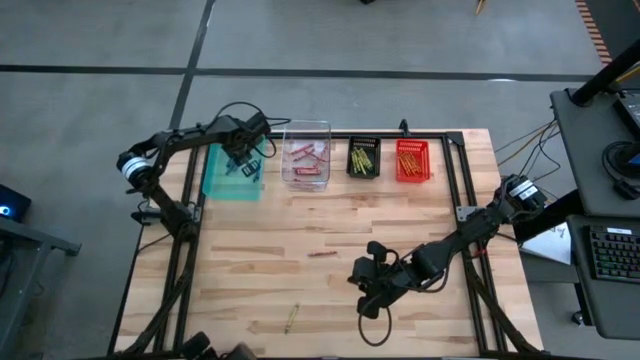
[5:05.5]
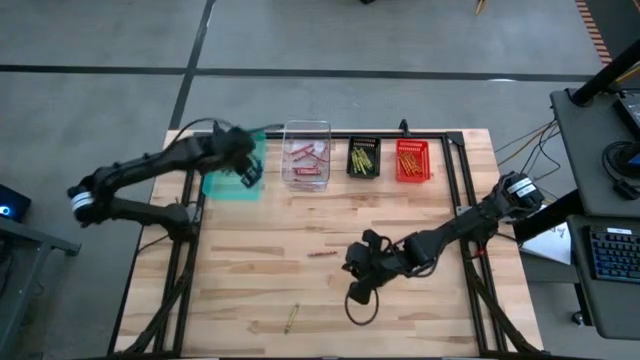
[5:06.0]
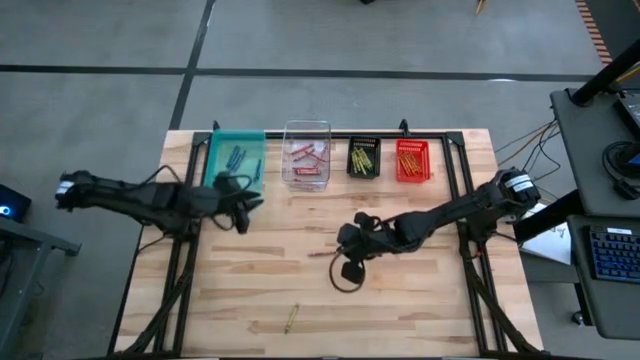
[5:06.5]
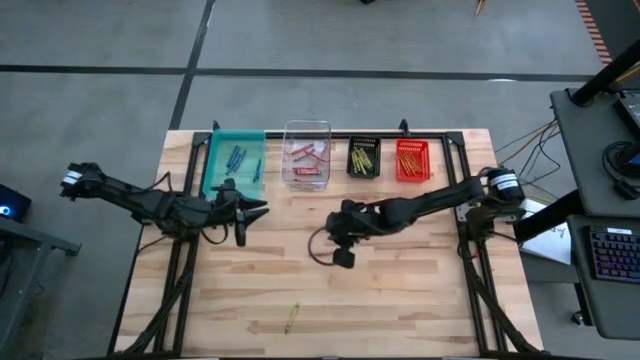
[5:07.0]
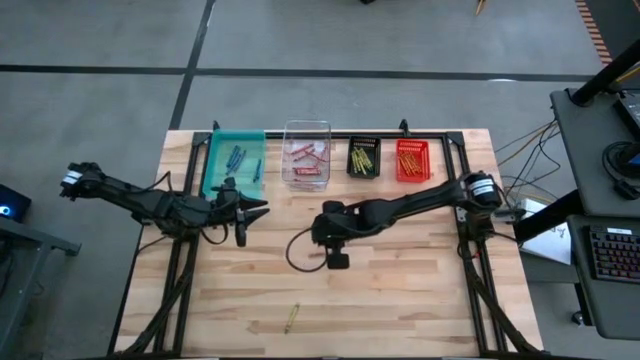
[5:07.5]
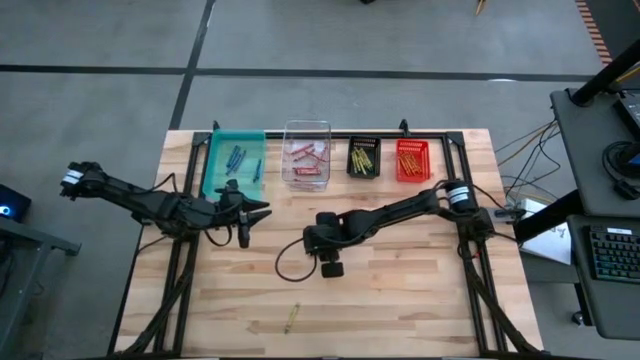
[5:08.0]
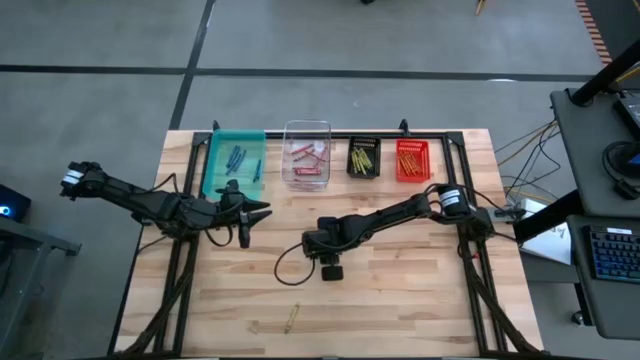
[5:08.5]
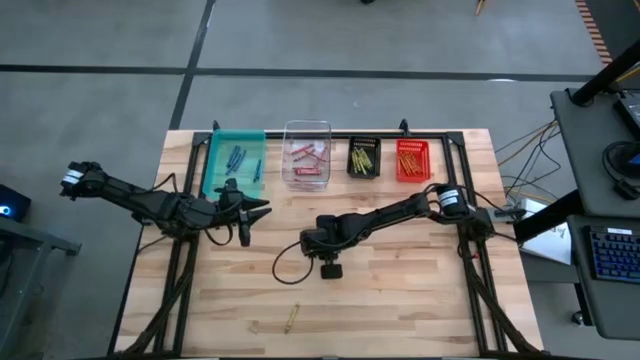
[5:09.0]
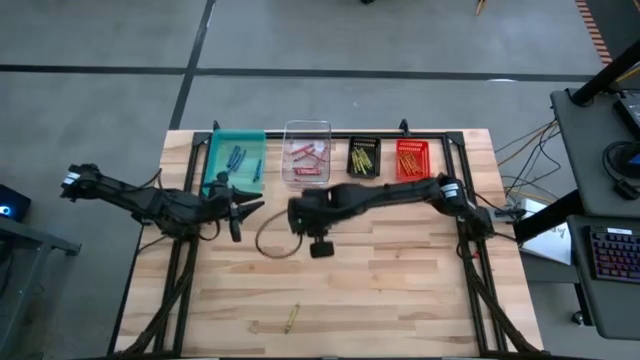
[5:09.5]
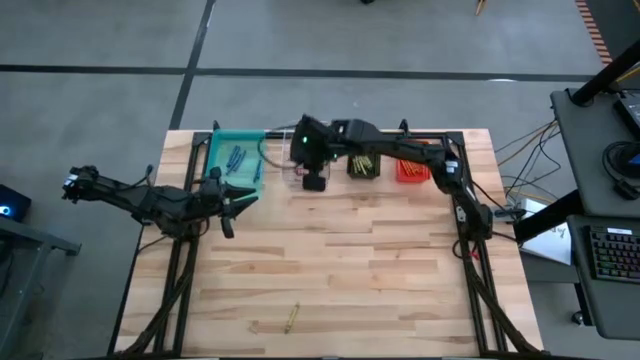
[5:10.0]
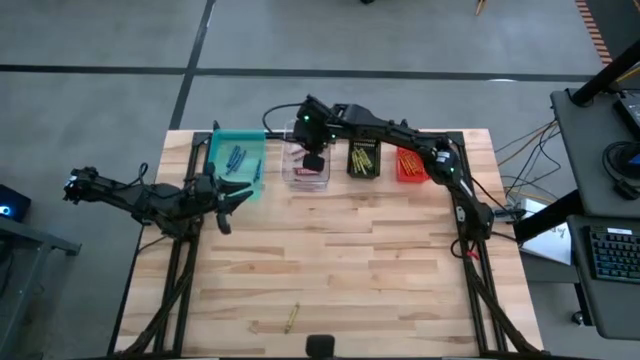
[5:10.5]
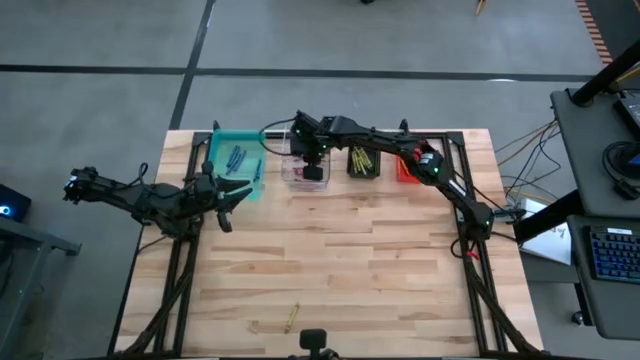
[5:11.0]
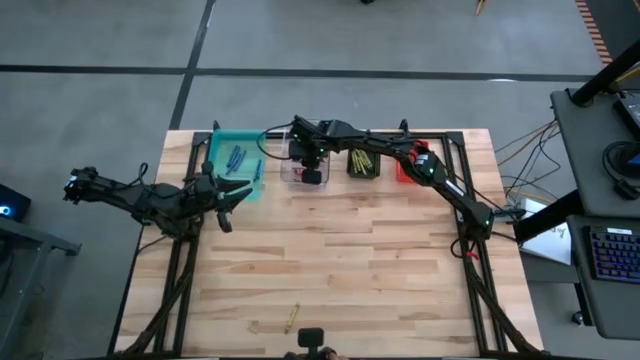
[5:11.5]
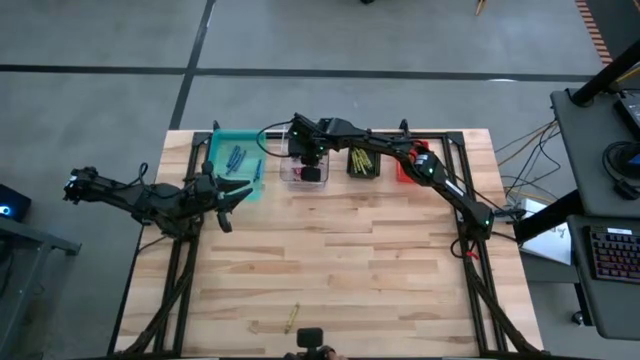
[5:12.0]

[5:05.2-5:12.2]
Task: Sort crayons
Put the red crayon into the transparent bin

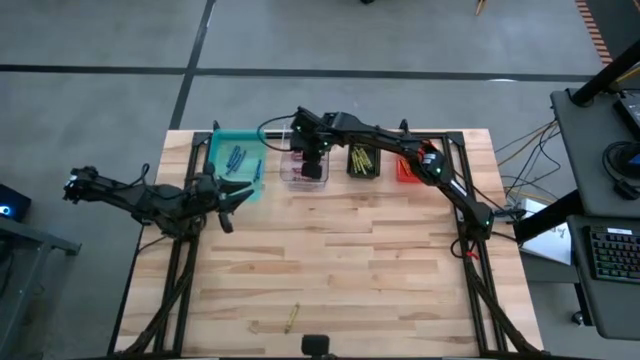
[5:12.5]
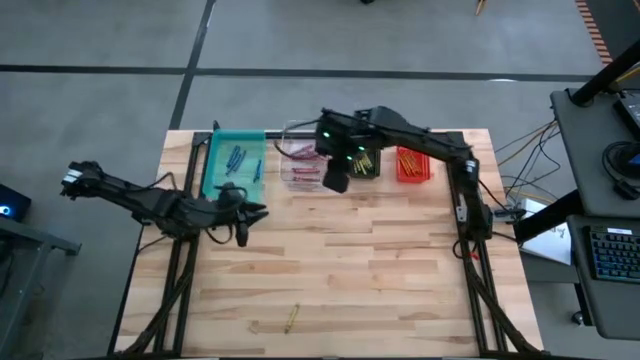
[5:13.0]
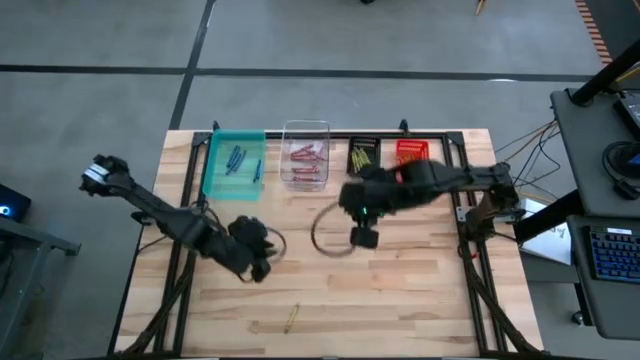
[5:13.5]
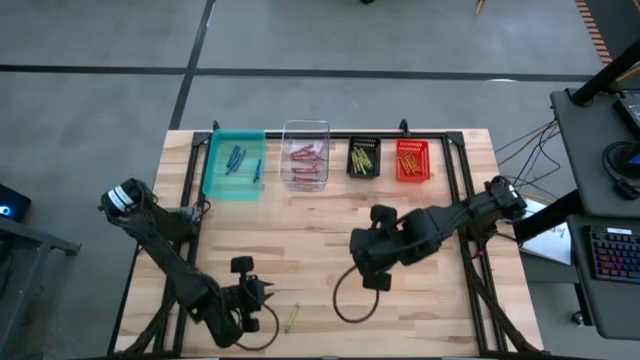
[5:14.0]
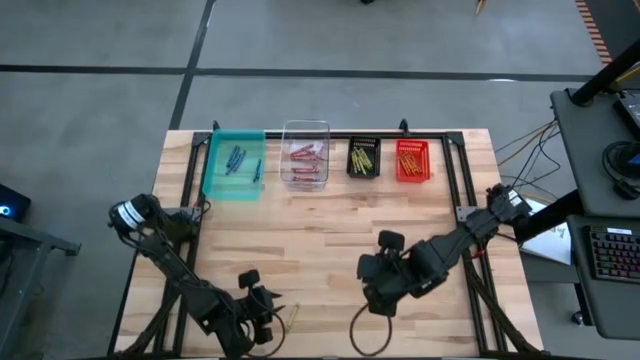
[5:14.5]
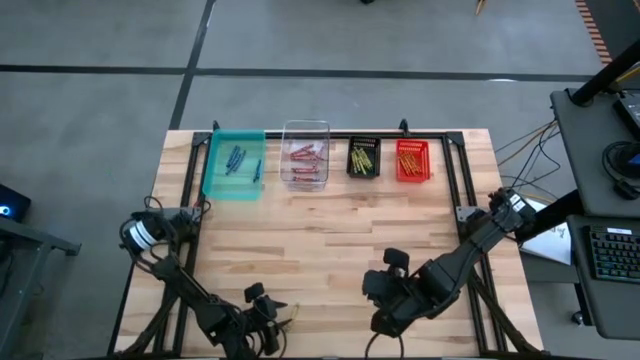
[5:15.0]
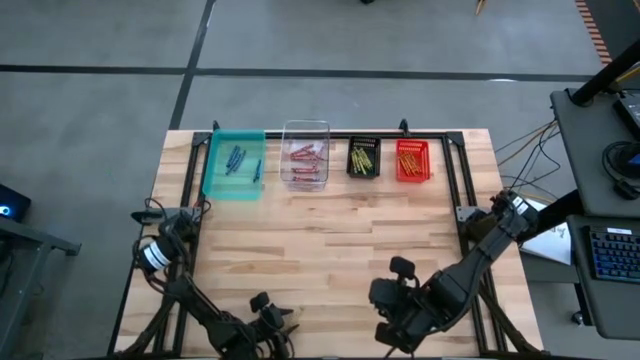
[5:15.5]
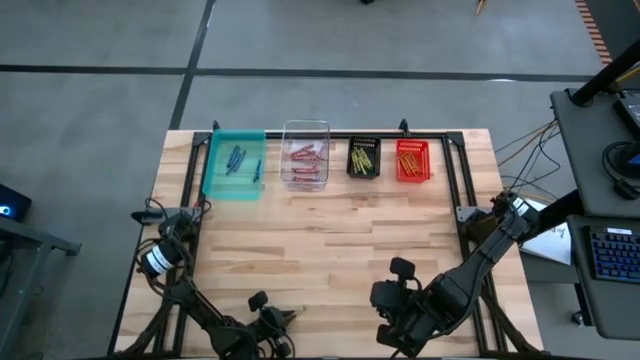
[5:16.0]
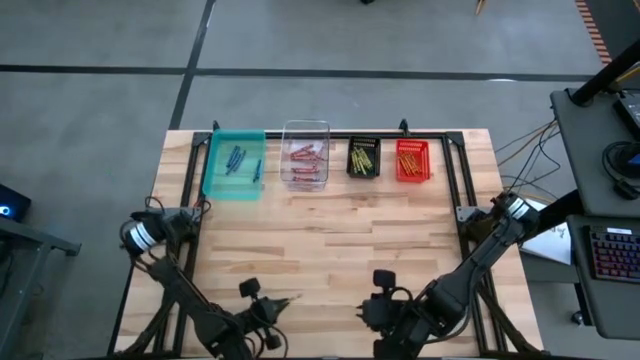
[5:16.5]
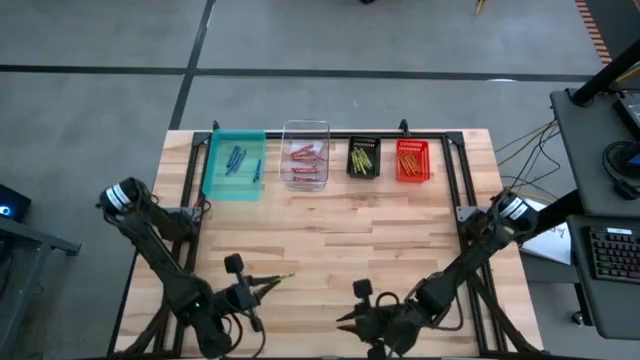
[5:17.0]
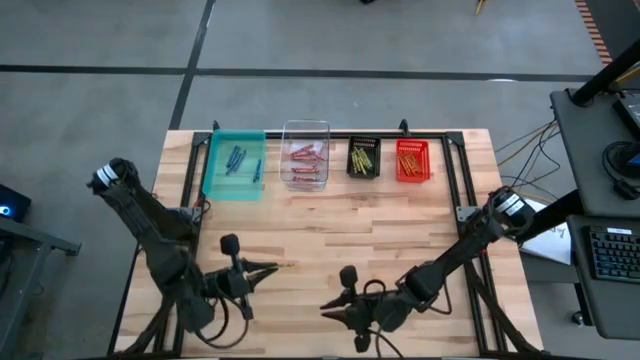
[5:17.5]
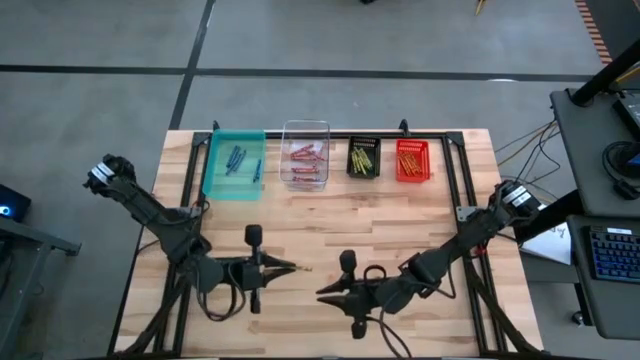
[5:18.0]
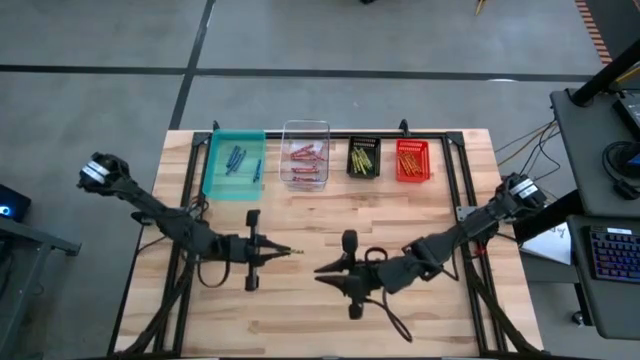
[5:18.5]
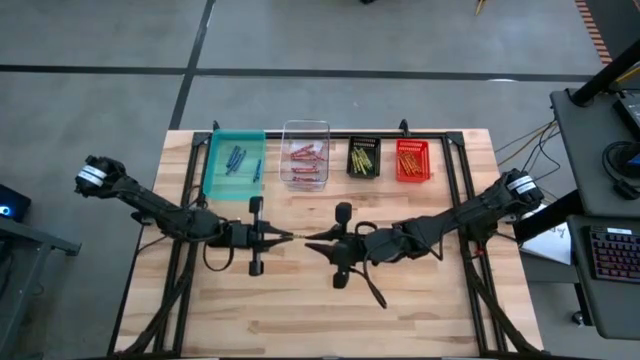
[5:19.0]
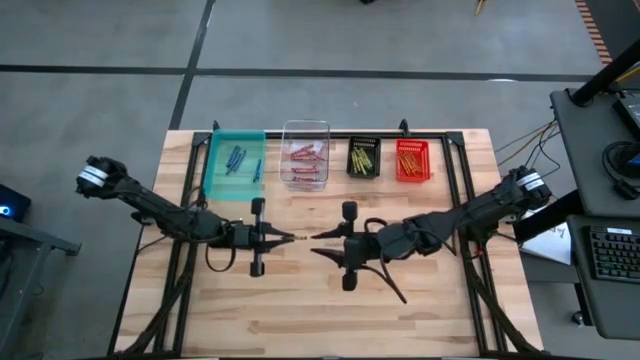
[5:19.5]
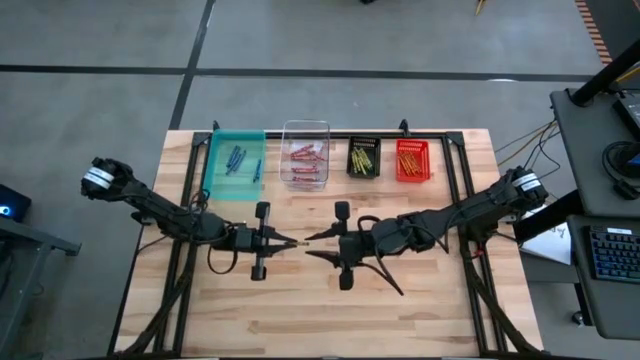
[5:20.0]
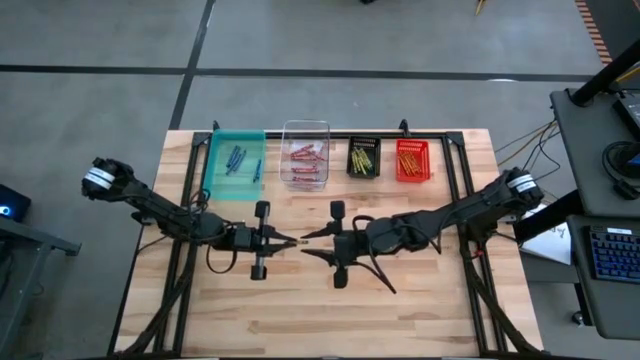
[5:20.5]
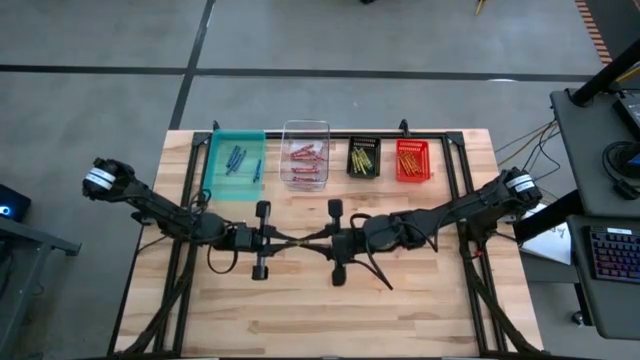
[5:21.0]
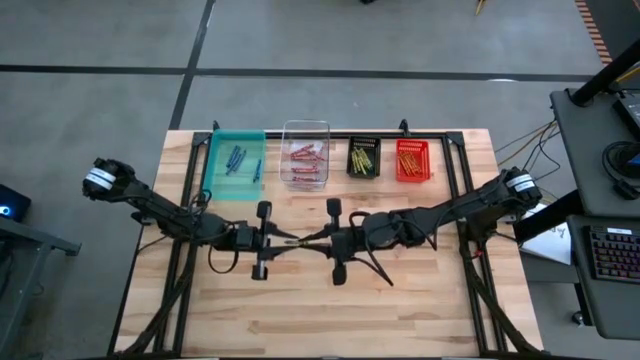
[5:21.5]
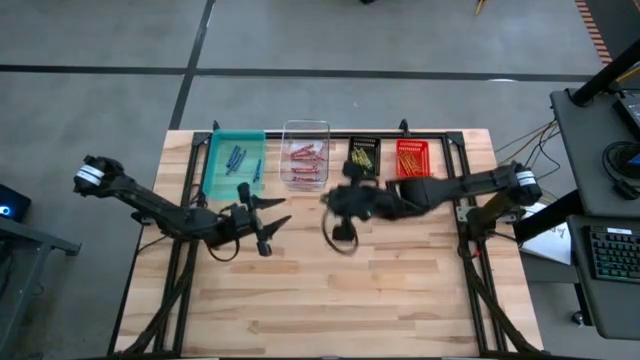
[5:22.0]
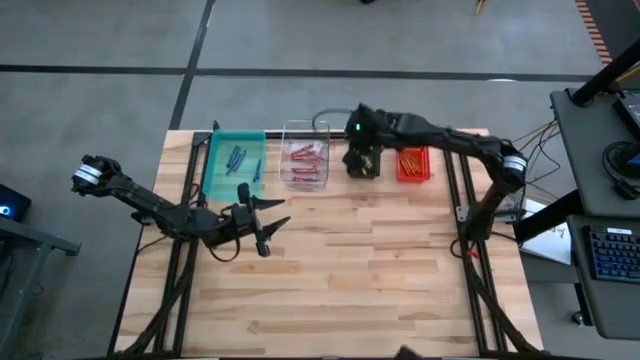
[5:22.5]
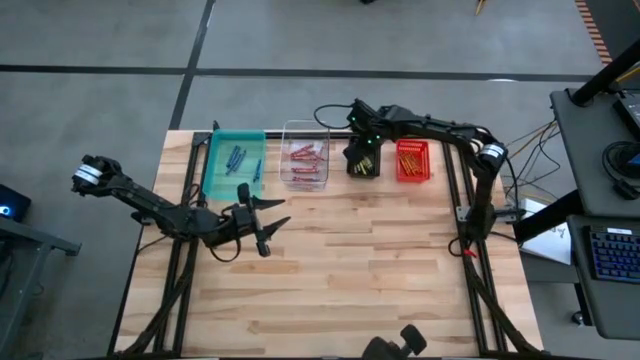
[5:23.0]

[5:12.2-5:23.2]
Put the green crayon into the black bin

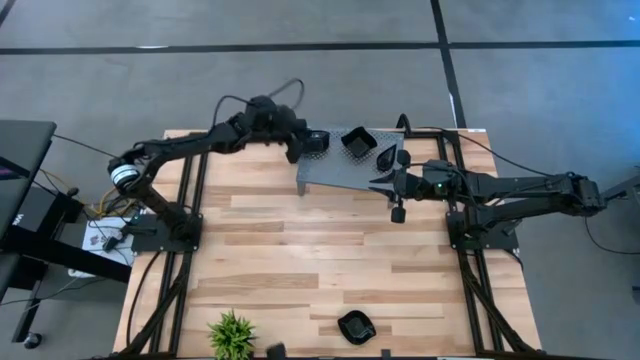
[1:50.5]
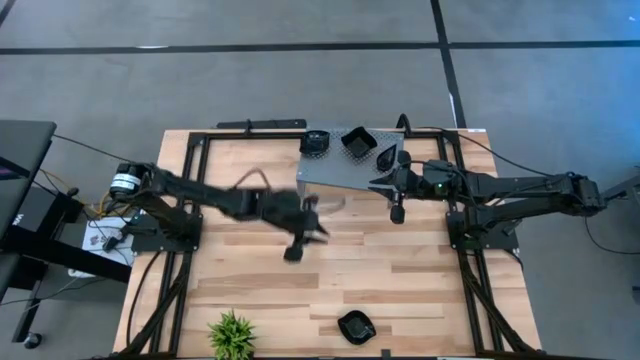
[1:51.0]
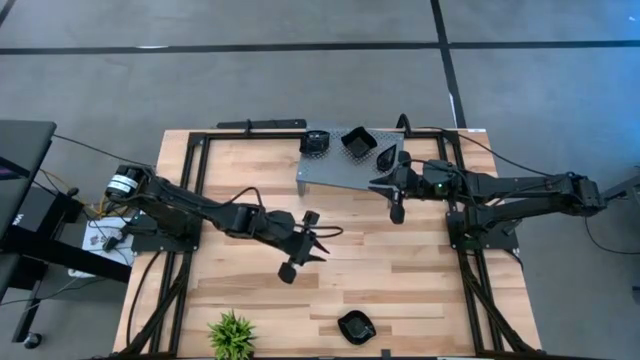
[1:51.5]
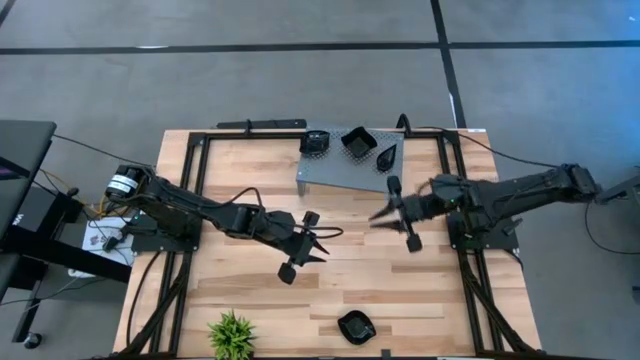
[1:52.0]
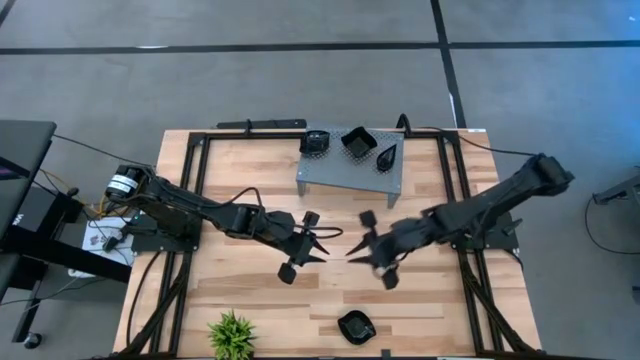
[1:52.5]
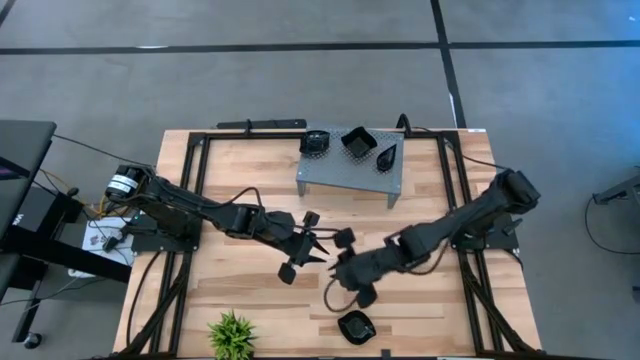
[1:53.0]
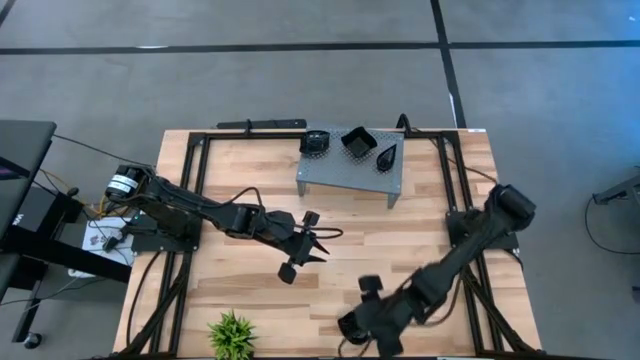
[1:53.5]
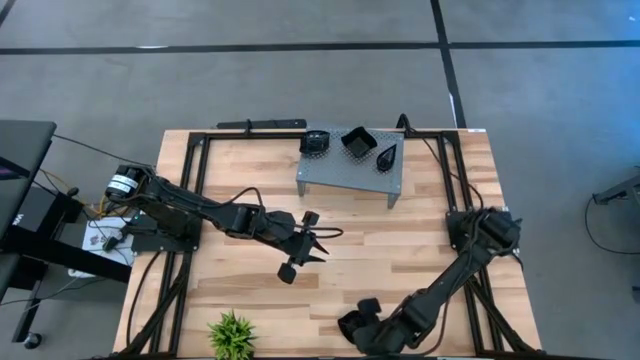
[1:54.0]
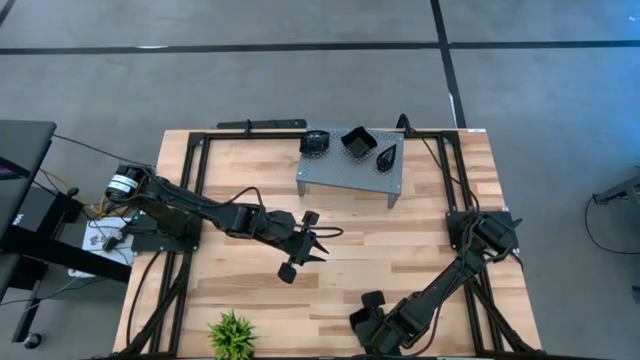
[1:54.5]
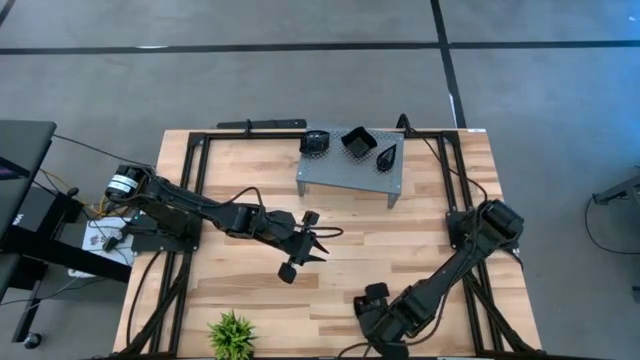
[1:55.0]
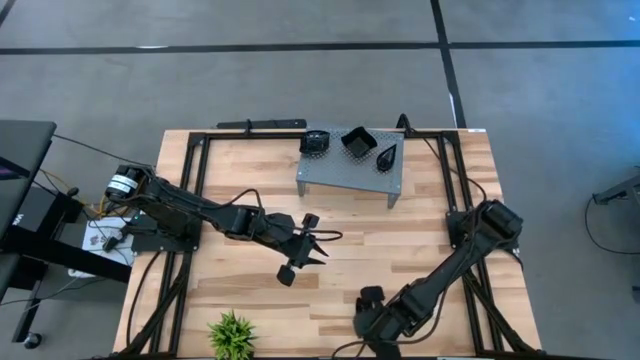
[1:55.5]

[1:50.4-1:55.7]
Task: Pick & Place Mini shaped plates
Stack the black leaf-shaped plate on the other black leaf-shaped plates on the shelf
